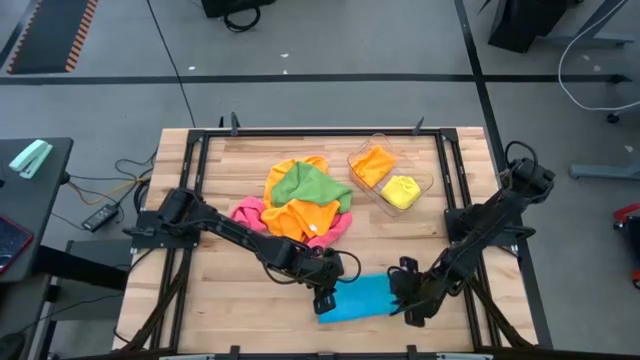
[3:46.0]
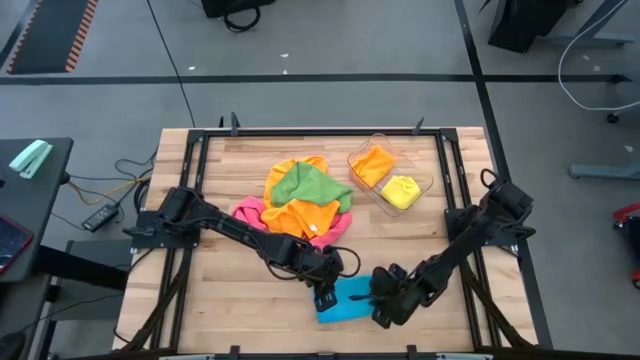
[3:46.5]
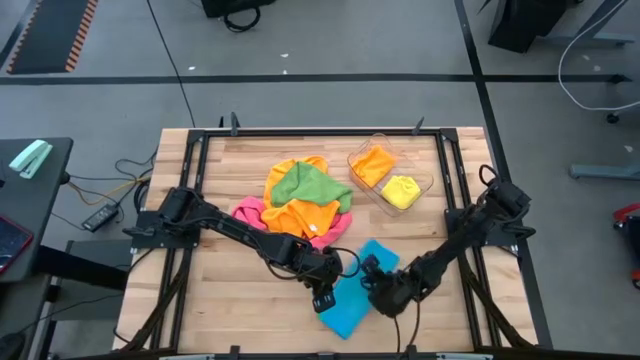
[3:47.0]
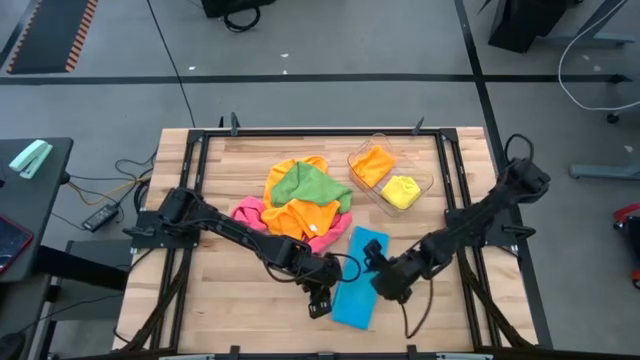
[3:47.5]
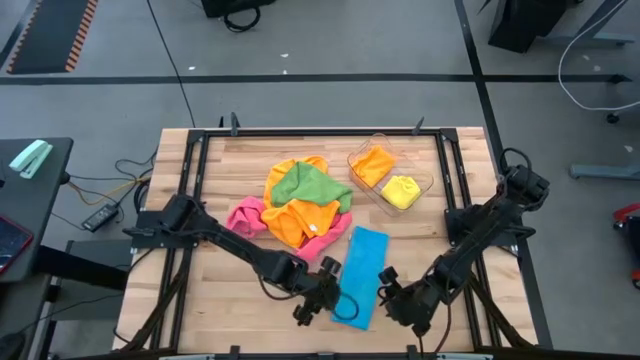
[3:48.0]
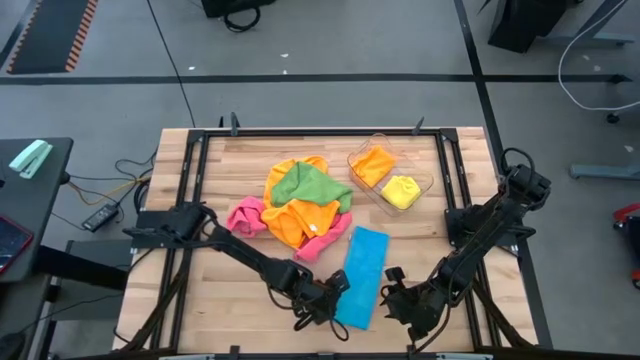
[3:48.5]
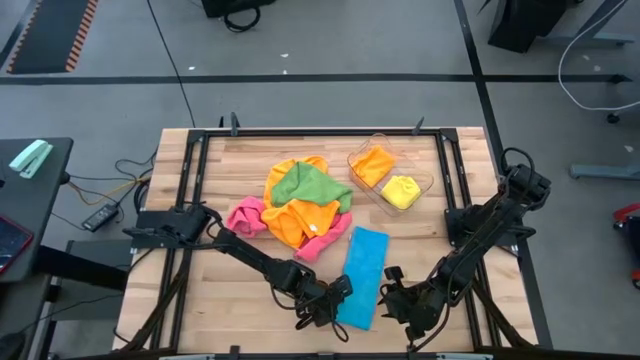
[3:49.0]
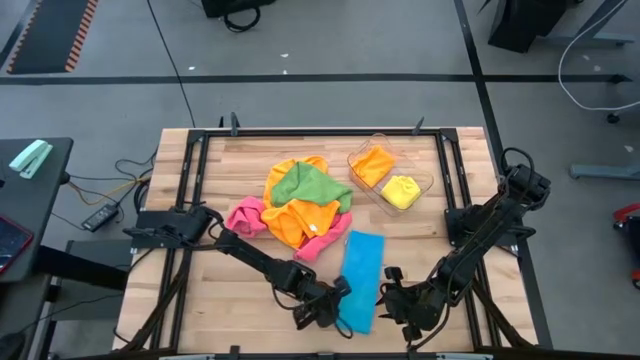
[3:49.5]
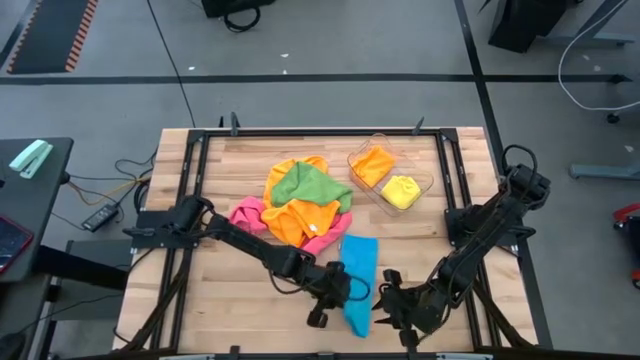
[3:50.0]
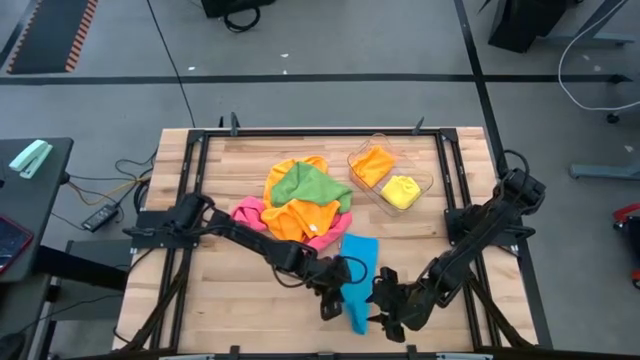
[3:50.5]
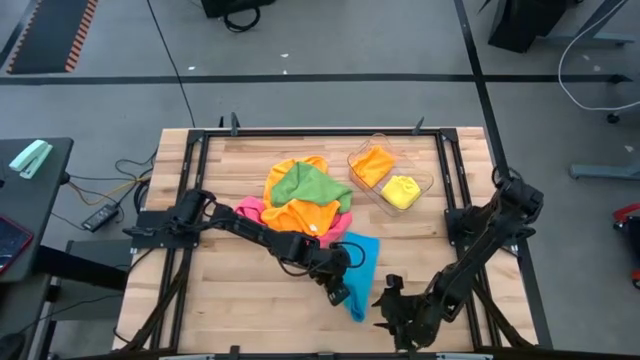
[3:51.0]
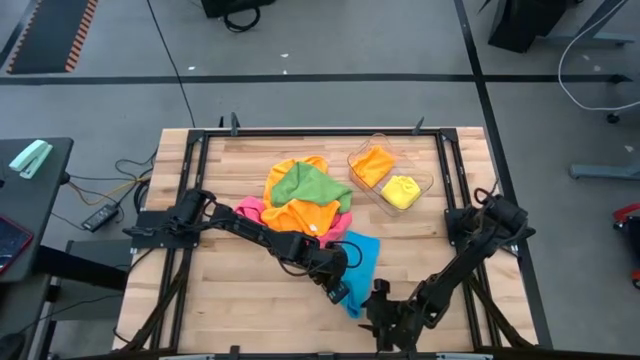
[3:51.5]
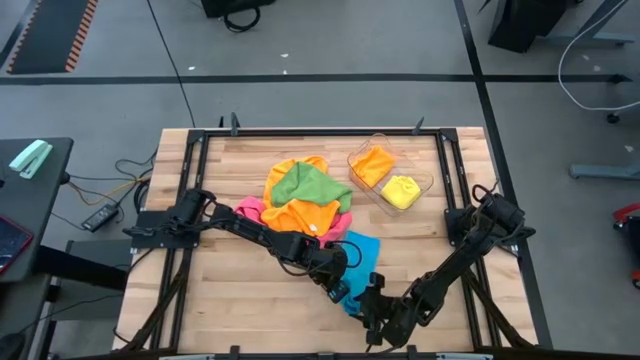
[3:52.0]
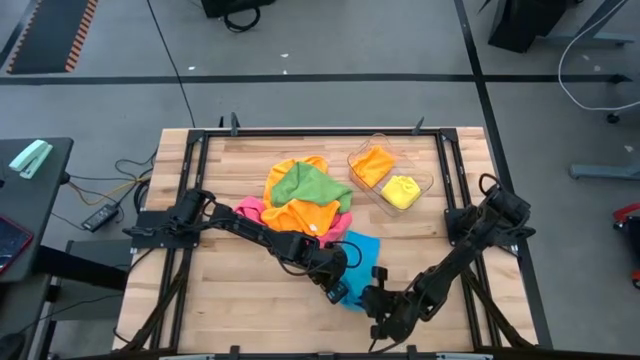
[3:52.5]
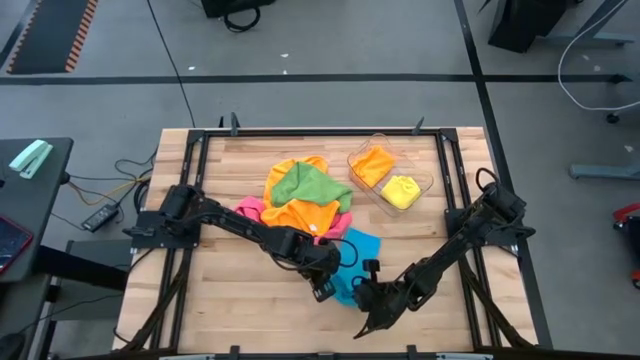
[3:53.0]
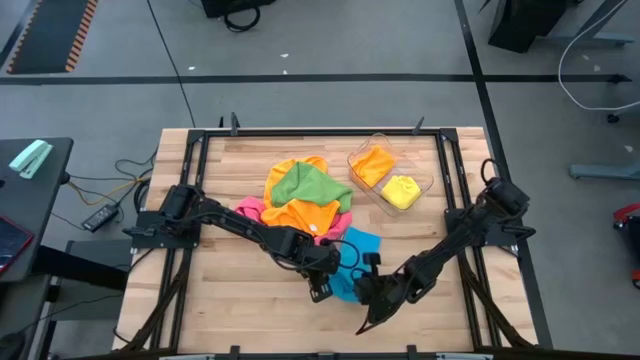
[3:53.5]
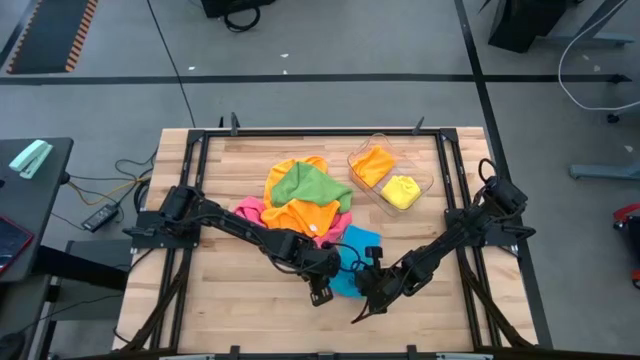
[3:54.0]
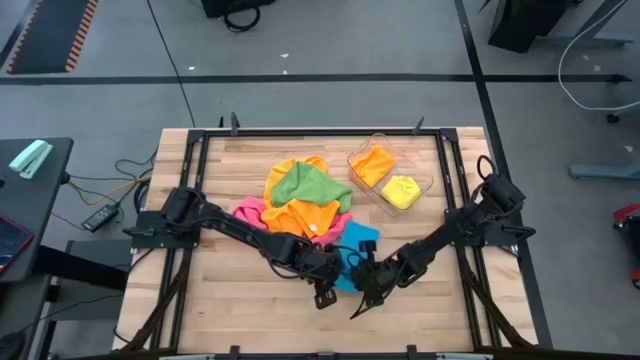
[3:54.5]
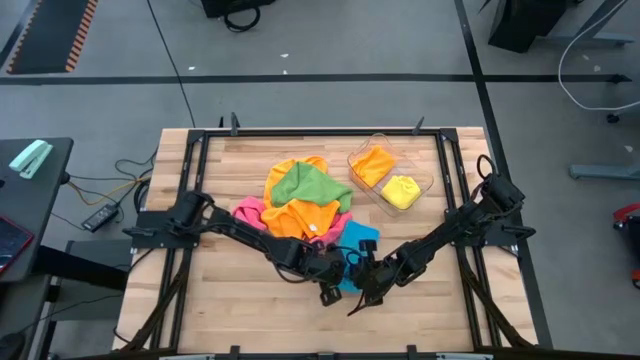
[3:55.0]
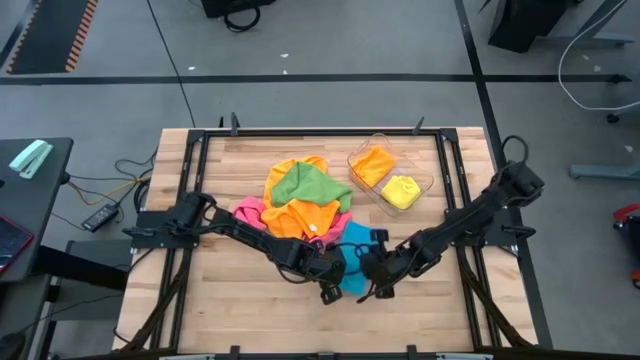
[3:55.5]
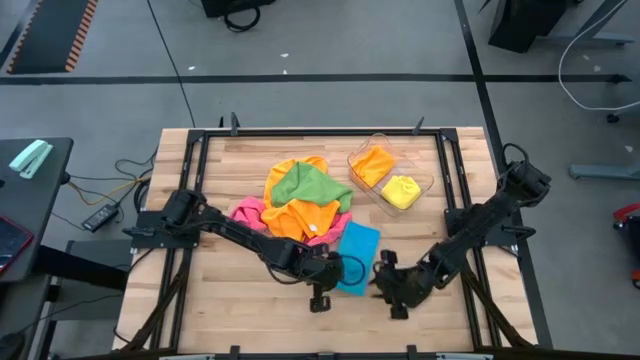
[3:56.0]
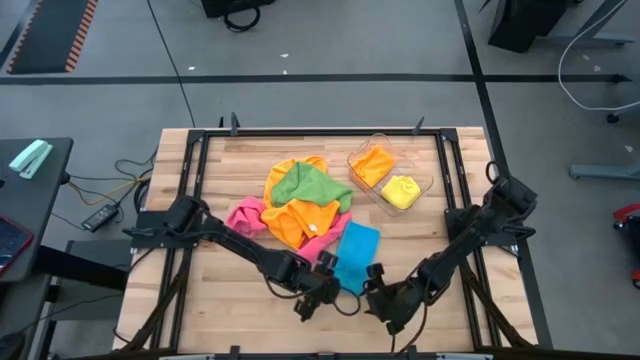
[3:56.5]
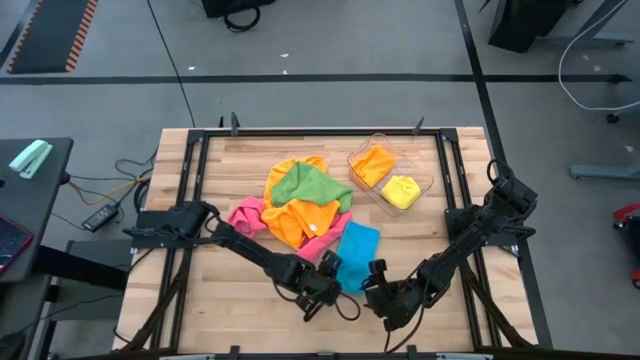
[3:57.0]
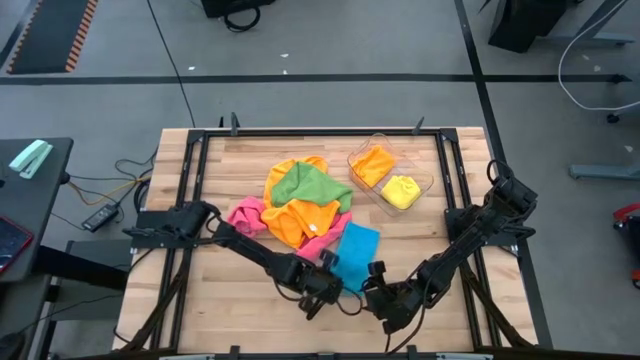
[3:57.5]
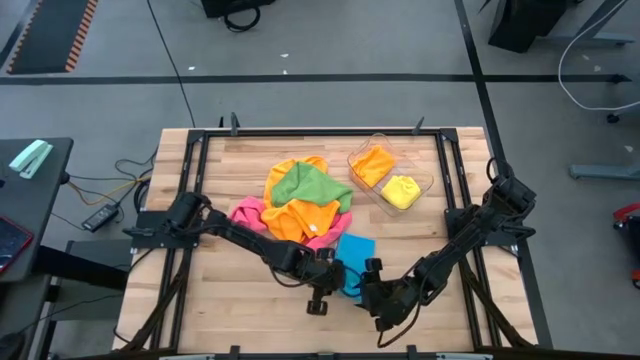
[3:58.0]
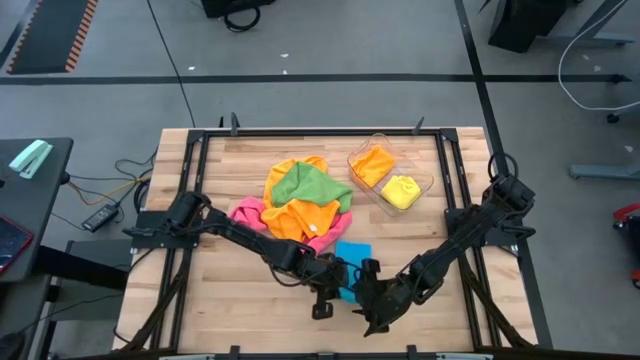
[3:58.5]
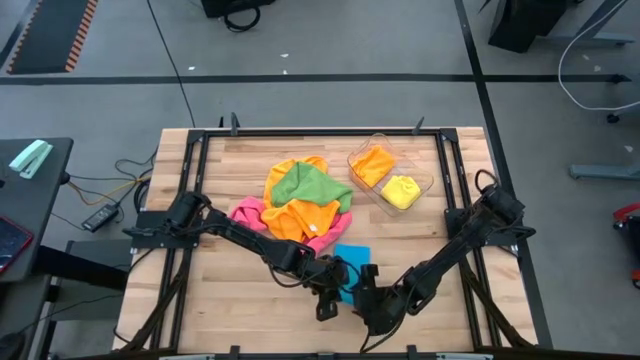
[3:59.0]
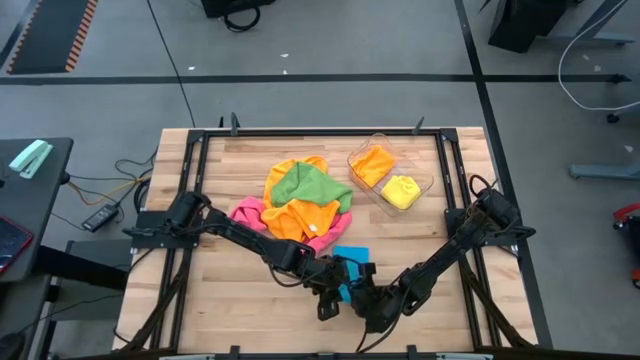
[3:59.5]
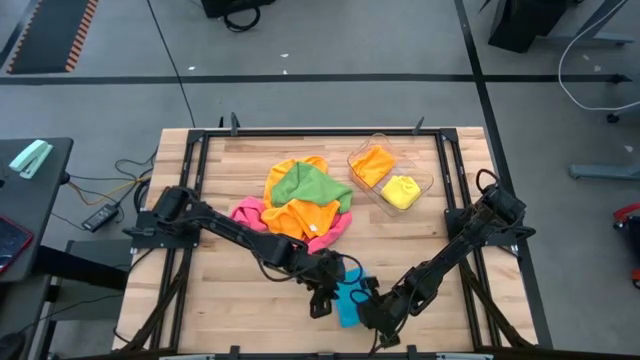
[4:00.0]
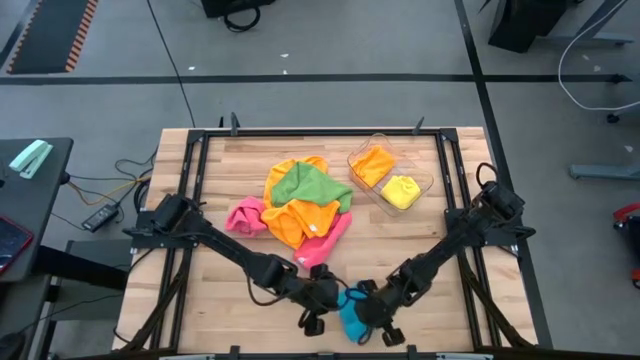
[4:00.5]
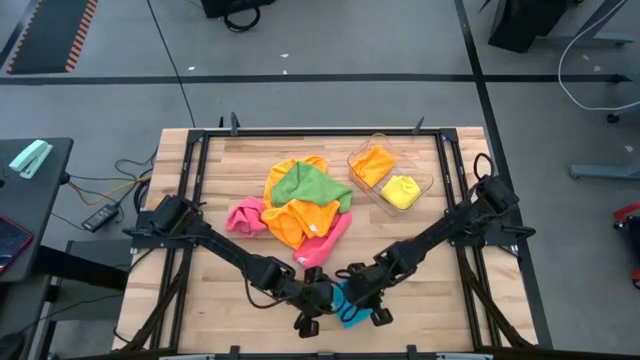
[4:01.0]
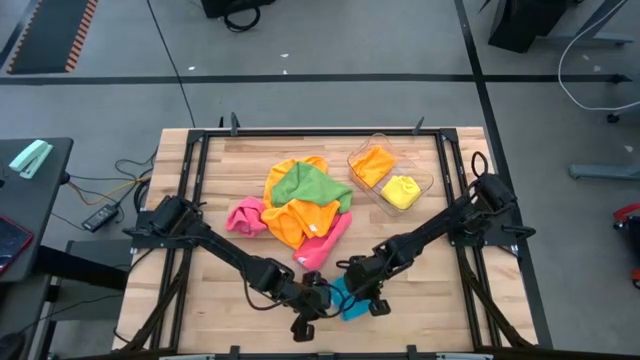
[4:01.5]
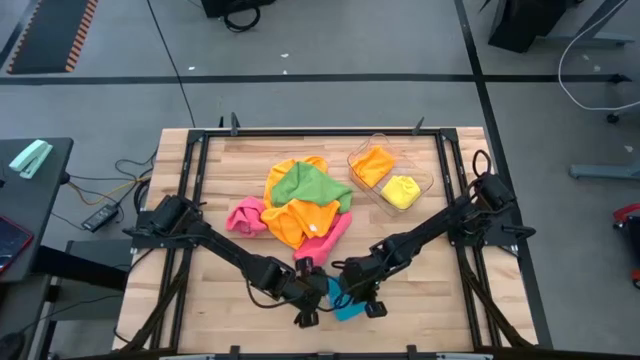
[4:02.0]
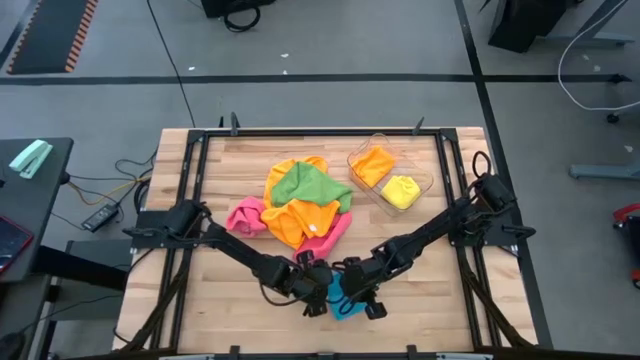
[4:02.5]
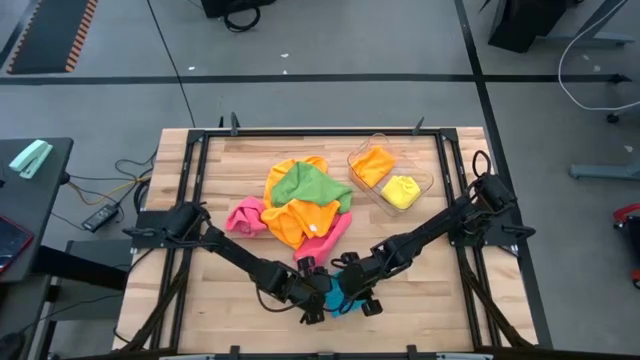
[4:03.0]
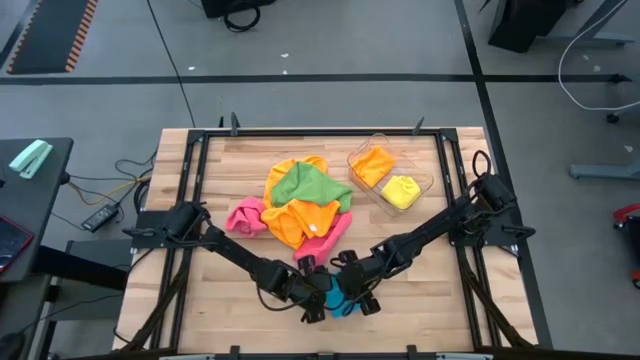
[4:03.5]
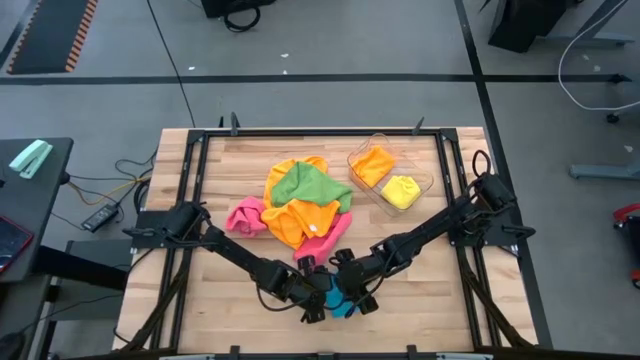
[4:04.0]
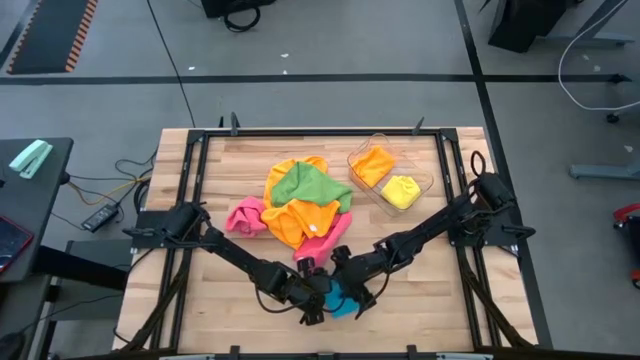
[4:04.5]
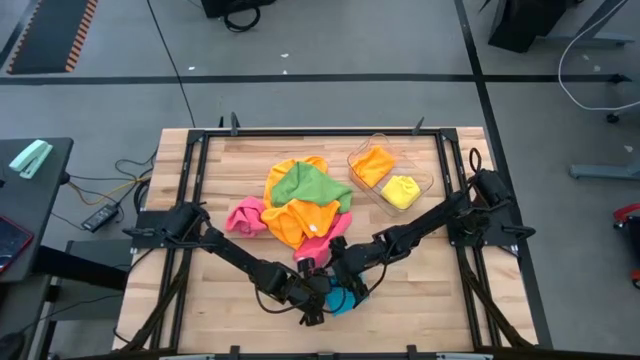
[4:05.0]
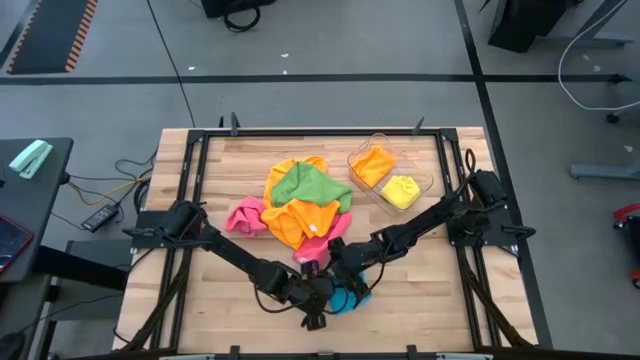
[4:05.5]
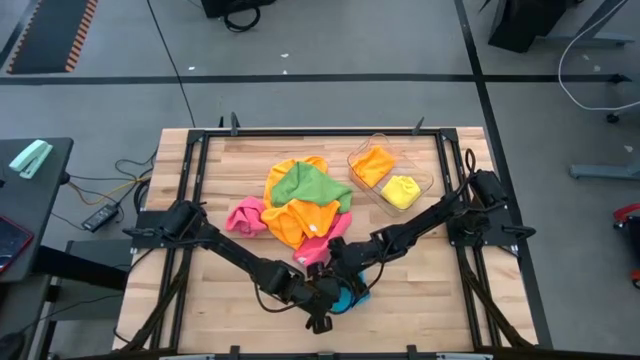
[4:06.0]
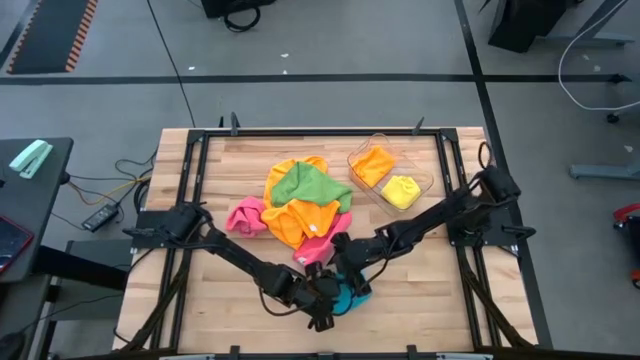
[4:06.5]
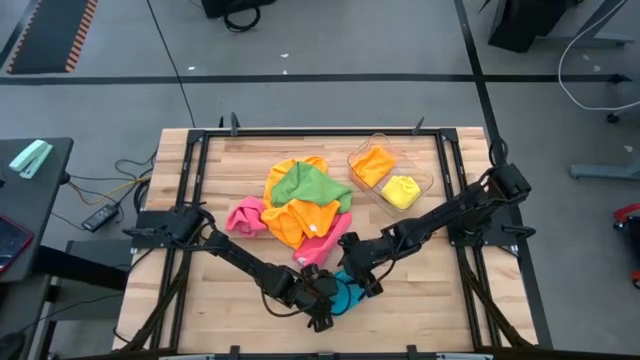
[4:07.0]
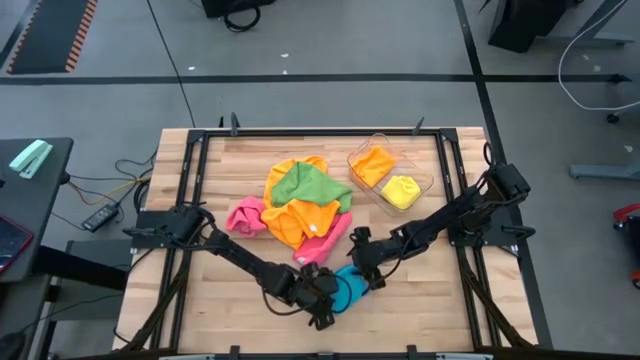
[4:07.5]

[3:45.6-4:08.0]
Task: Fold microfiber towels
Fold the blue towel
